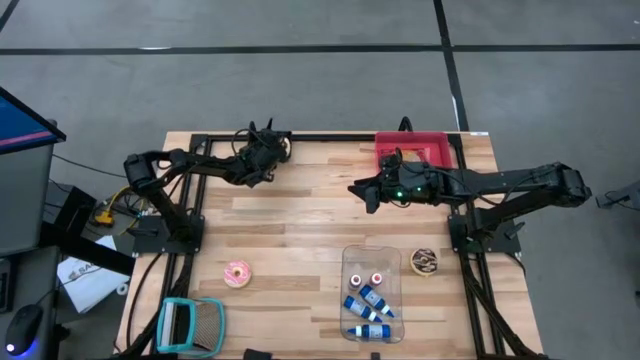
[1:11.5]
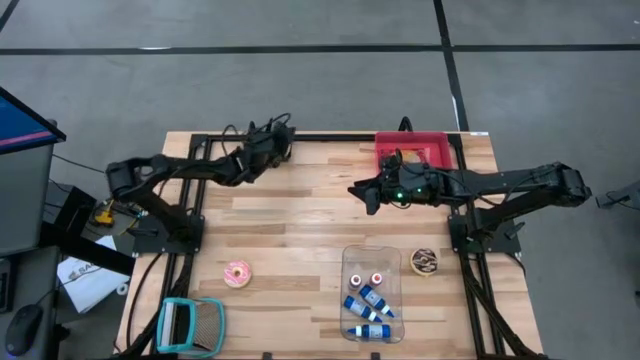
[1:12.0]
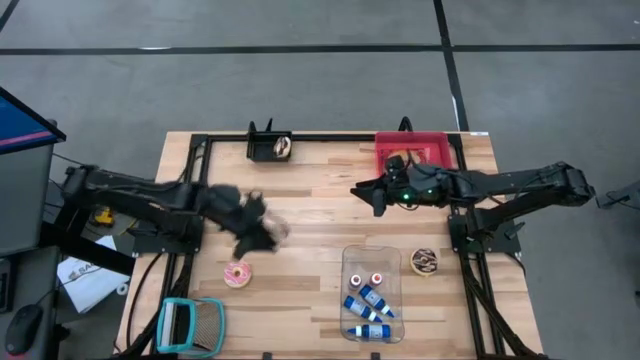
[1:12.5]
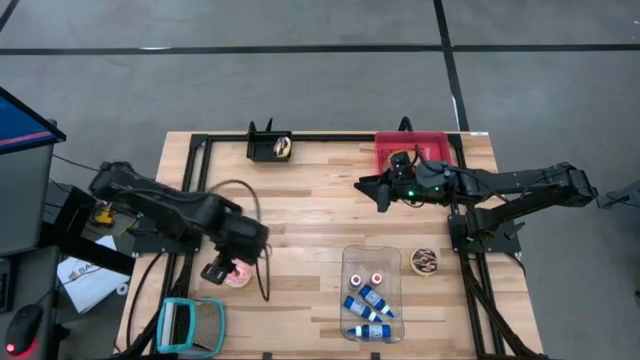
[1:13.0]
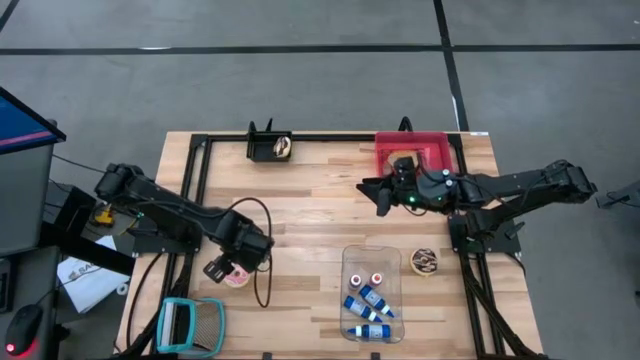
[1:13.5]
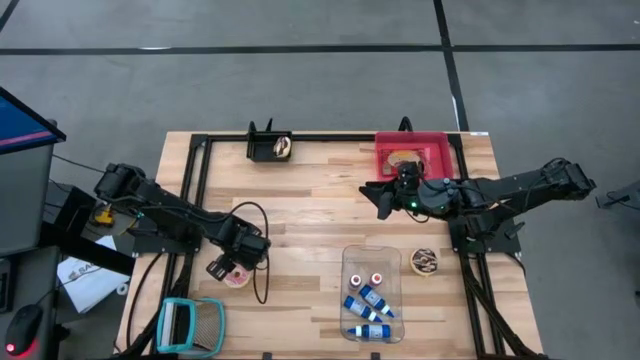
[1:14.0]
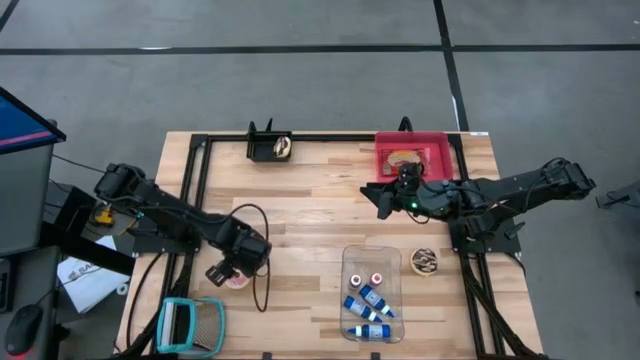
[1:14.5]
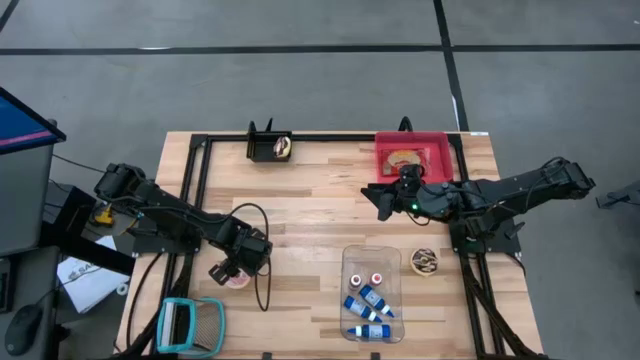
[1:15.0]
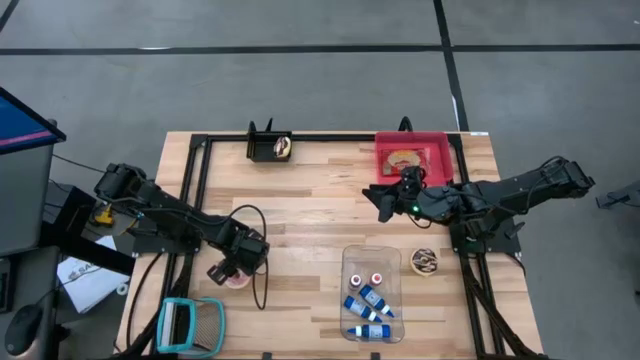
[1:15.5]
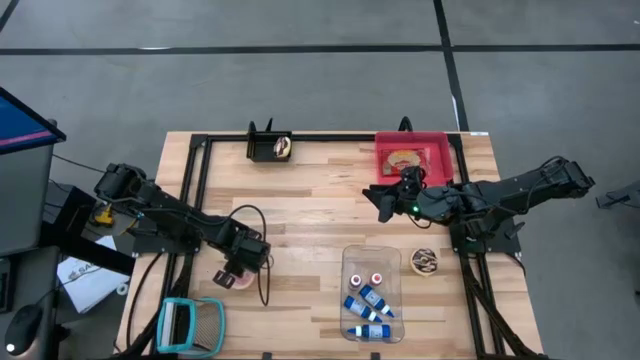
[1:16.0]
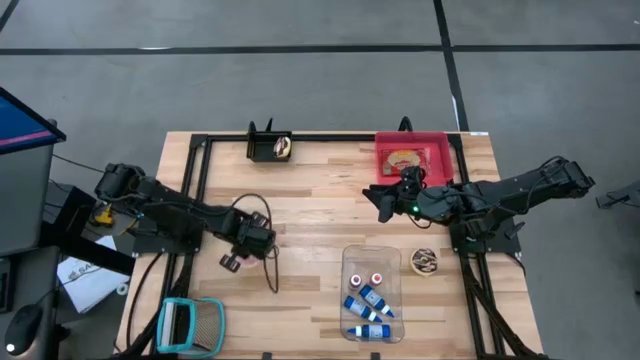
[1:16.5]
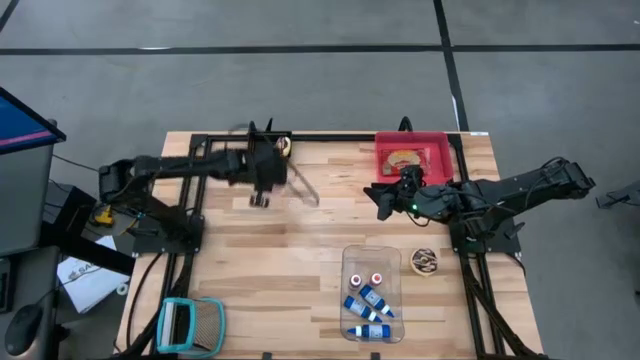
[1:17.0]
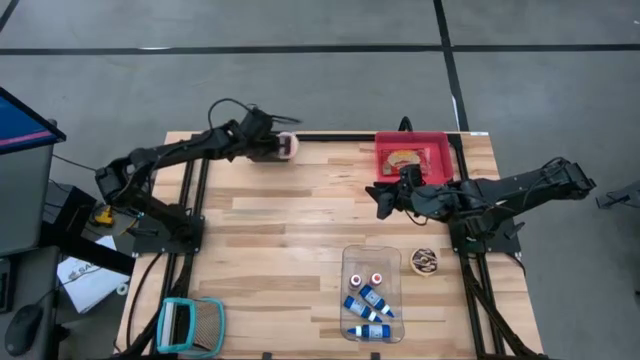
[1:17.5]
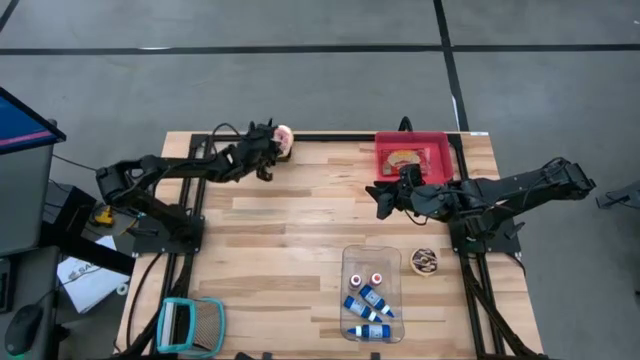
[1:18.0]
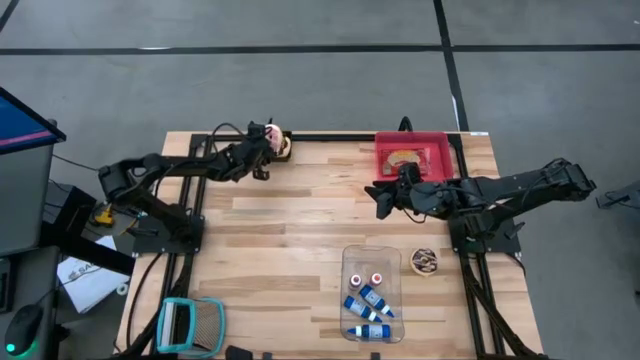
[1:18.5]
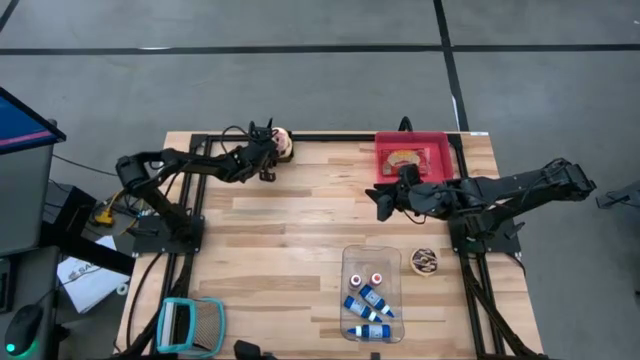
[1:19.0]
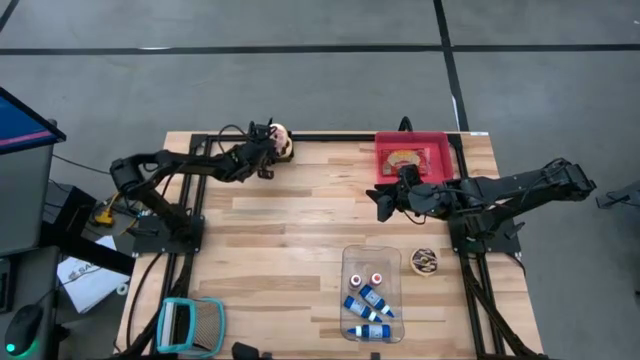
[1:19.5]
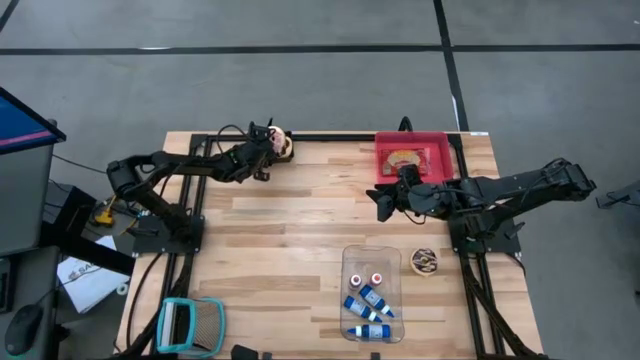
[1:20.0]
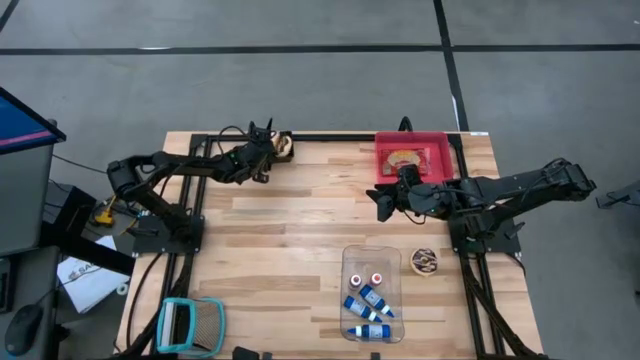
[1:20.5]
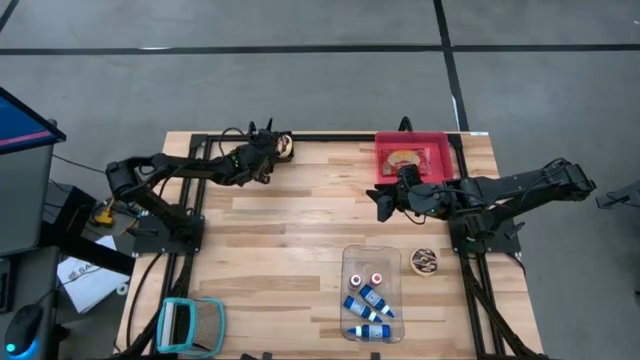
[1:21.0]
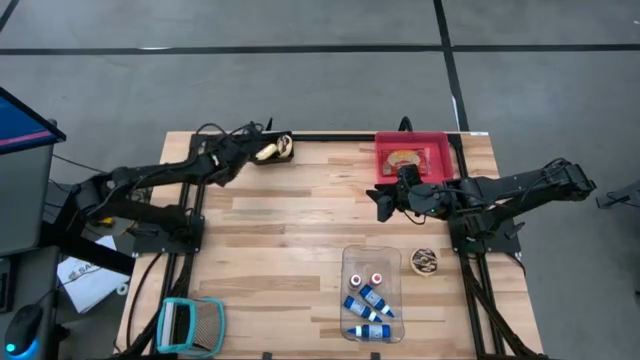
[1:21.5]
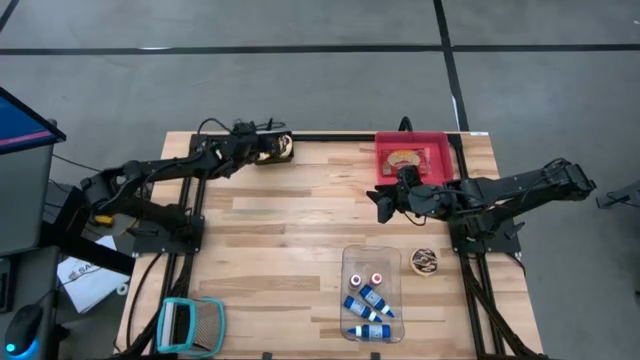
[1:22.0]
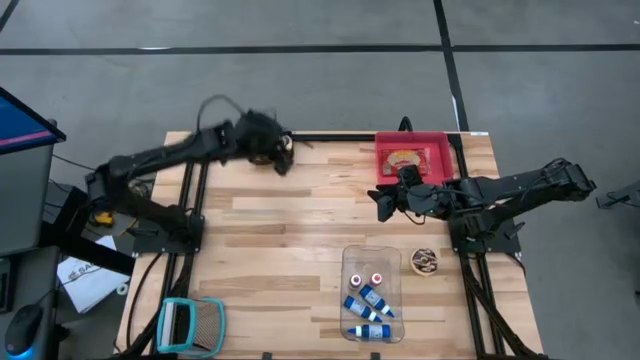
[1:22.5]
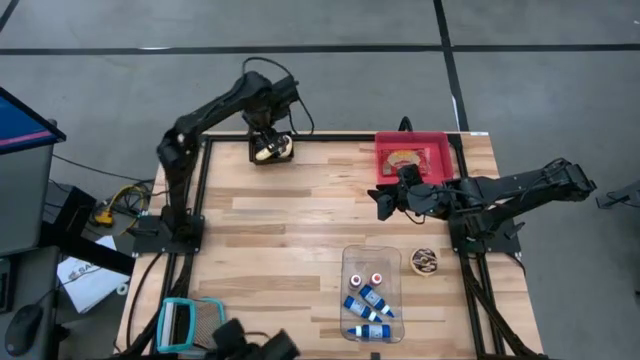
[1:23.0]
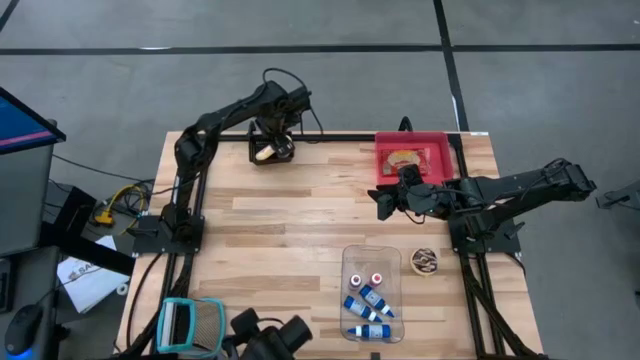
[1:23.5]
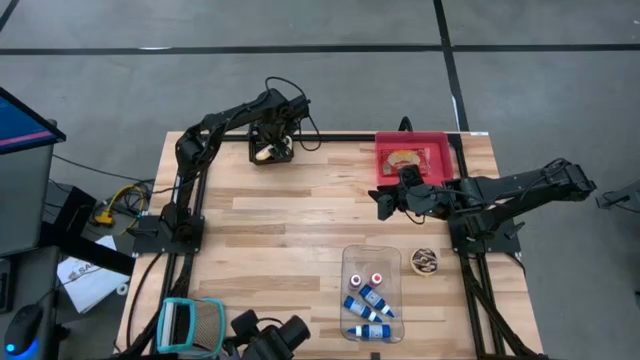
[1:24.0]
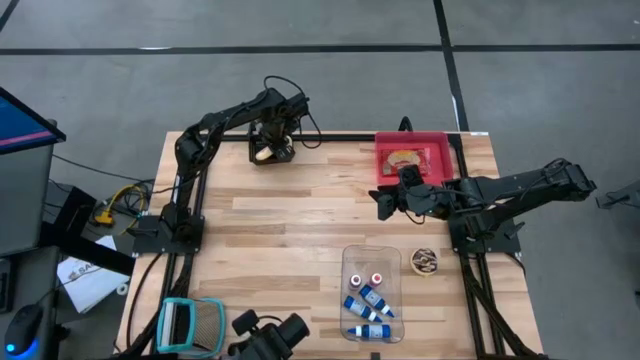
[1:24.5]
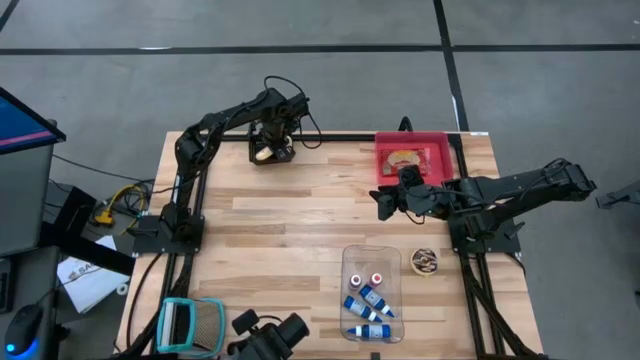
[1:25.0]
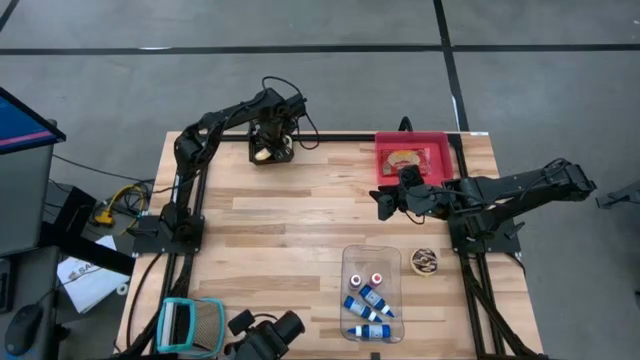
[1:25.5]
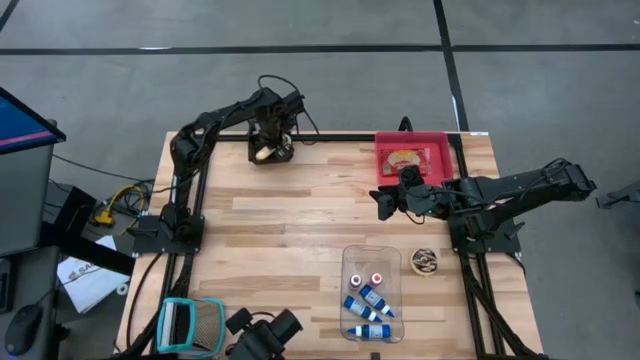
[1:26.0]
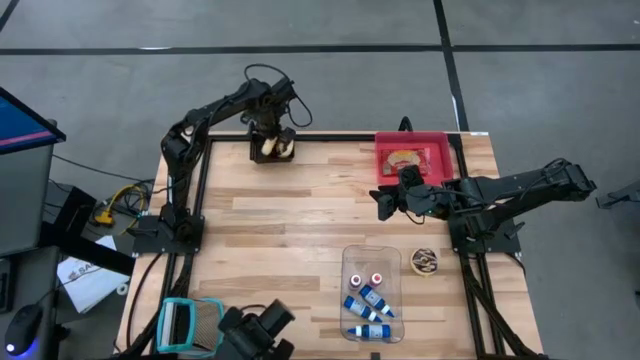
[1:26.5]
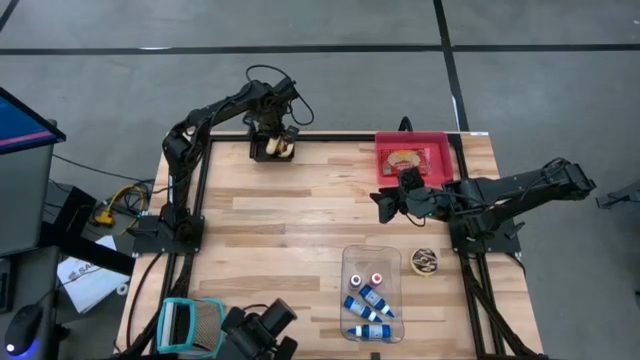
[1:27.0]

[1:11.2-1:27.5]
Put the pink donut into the black bin
